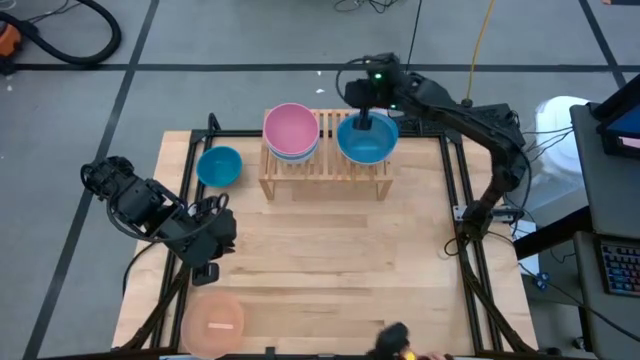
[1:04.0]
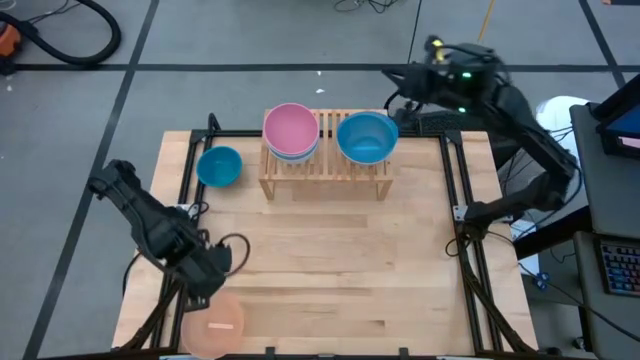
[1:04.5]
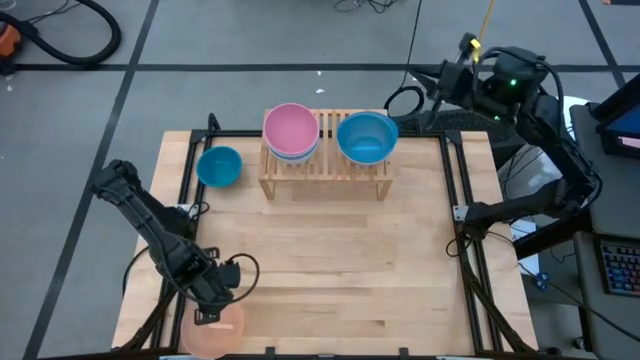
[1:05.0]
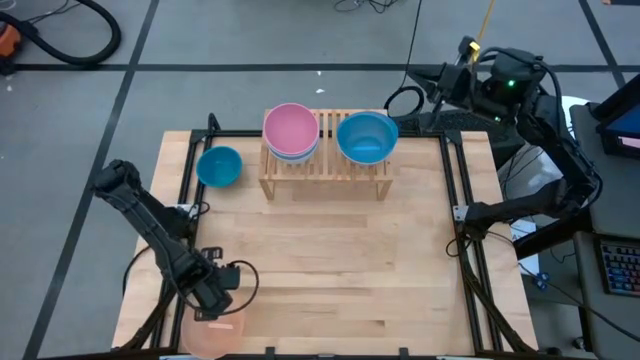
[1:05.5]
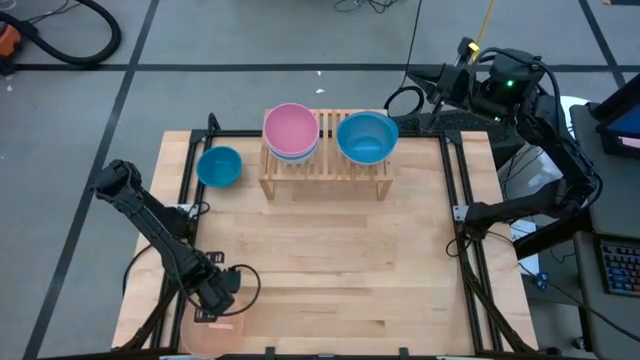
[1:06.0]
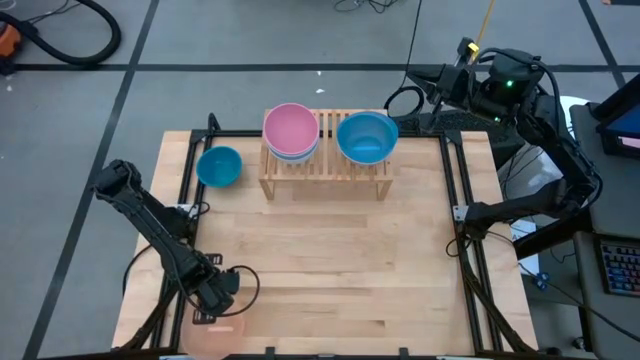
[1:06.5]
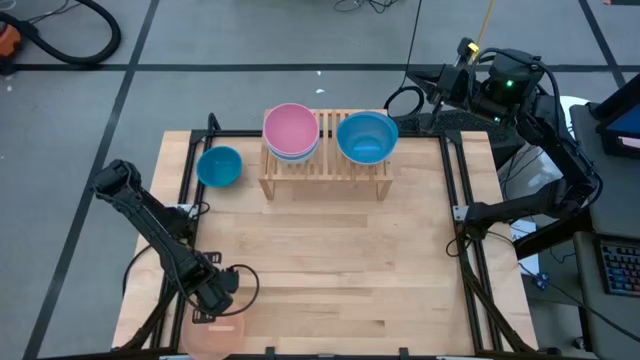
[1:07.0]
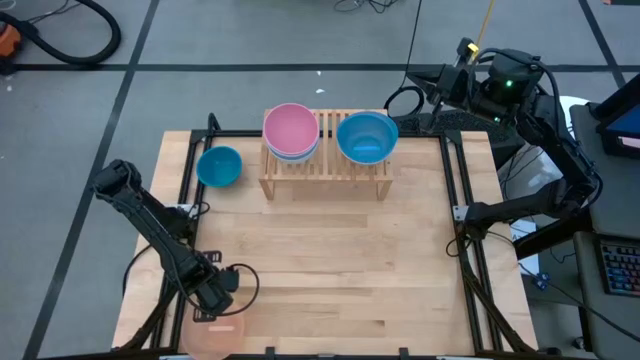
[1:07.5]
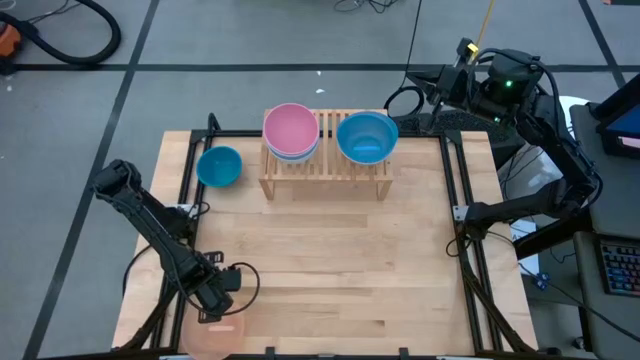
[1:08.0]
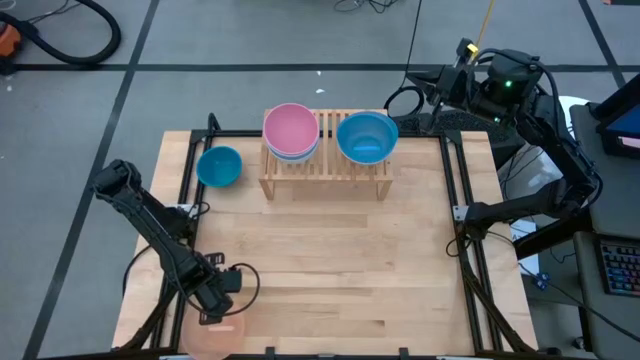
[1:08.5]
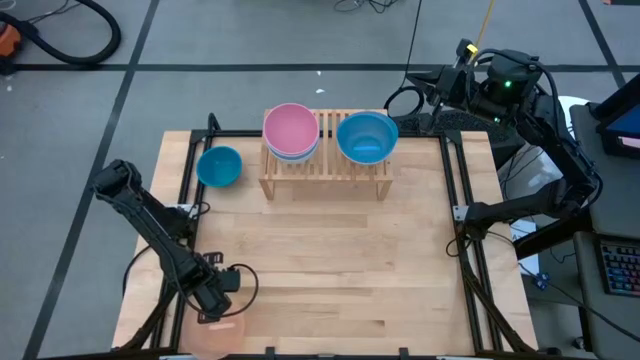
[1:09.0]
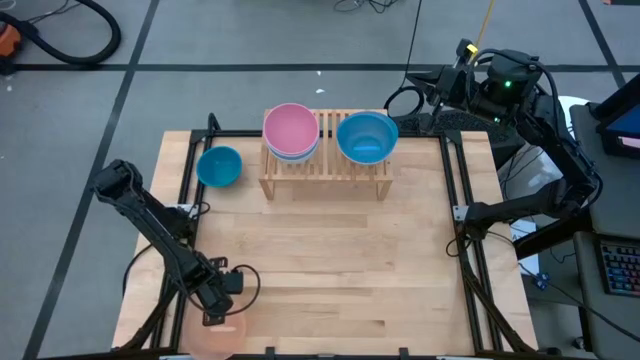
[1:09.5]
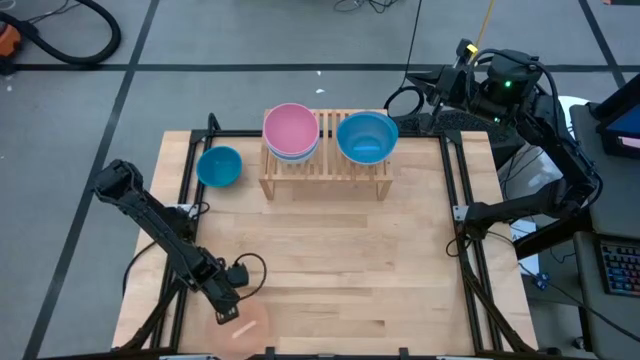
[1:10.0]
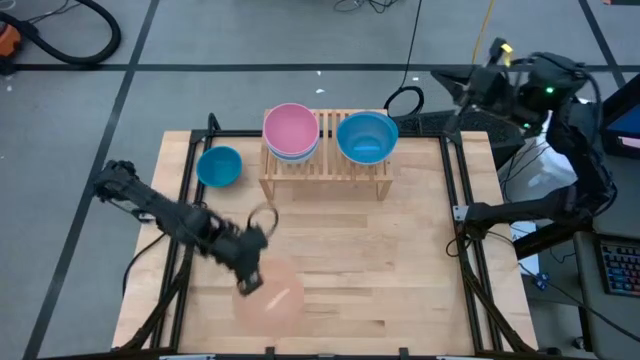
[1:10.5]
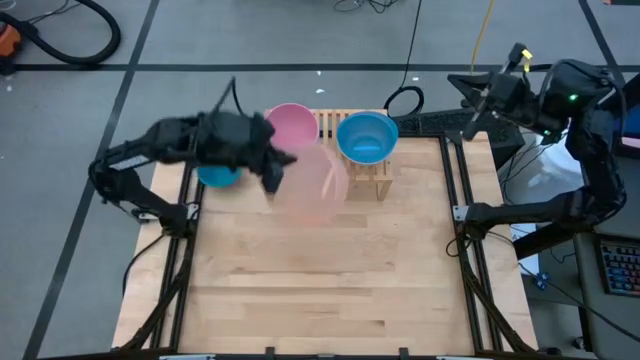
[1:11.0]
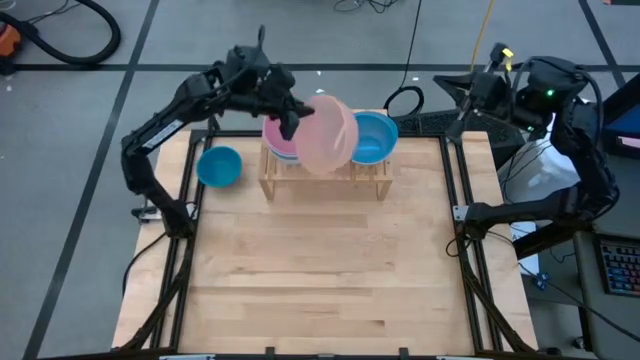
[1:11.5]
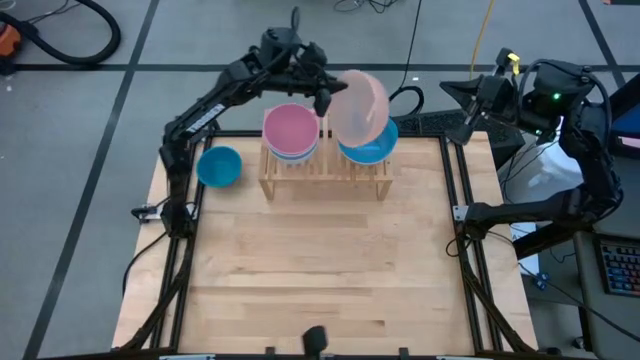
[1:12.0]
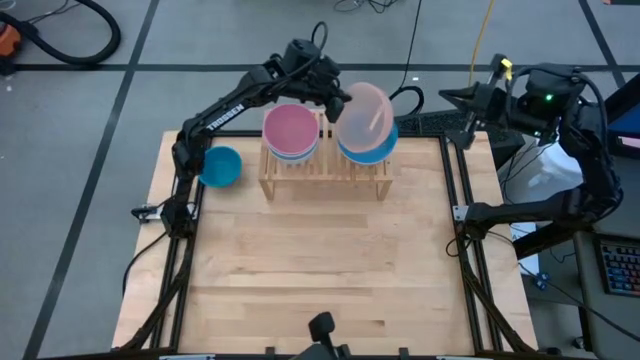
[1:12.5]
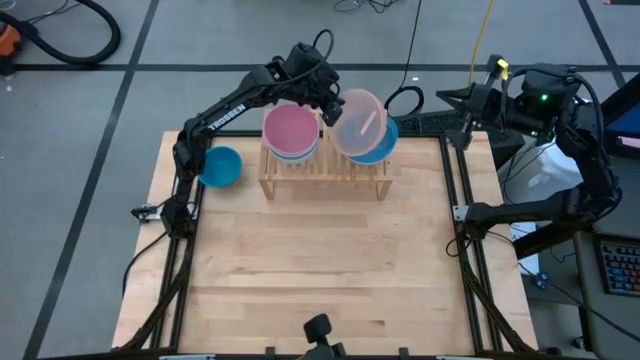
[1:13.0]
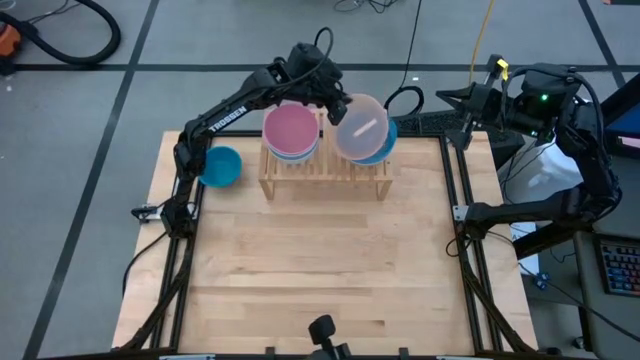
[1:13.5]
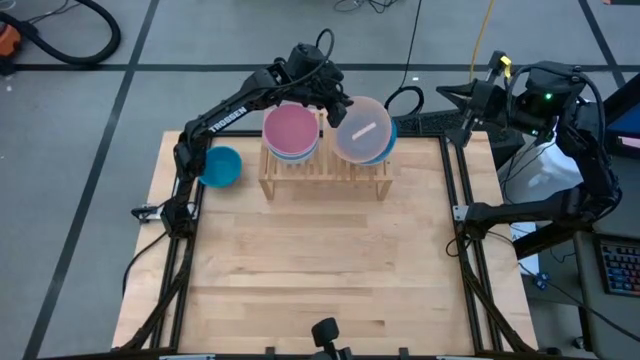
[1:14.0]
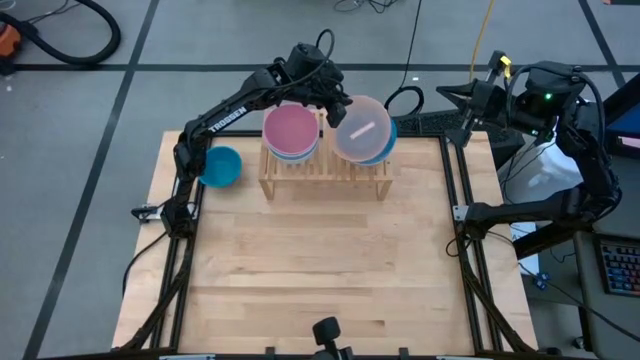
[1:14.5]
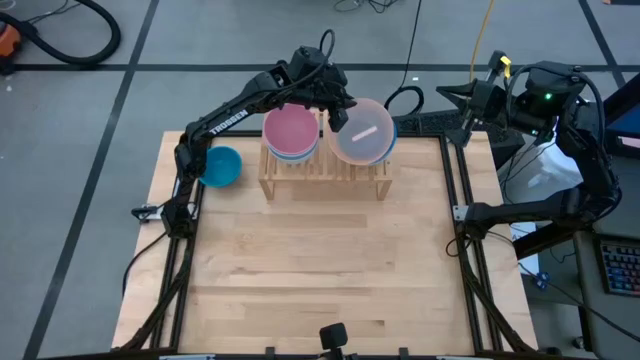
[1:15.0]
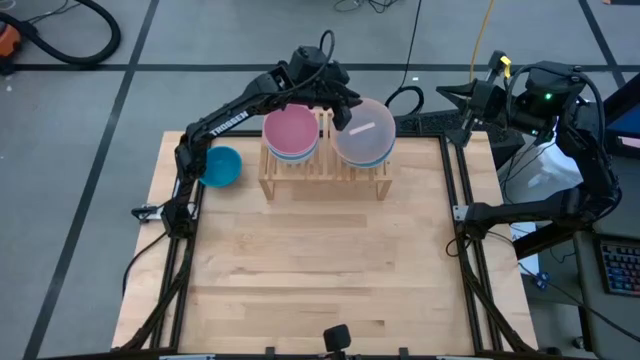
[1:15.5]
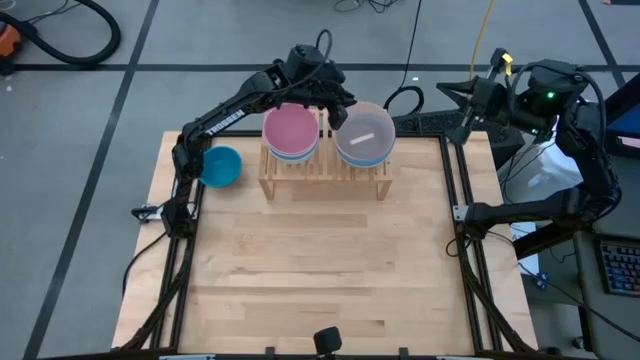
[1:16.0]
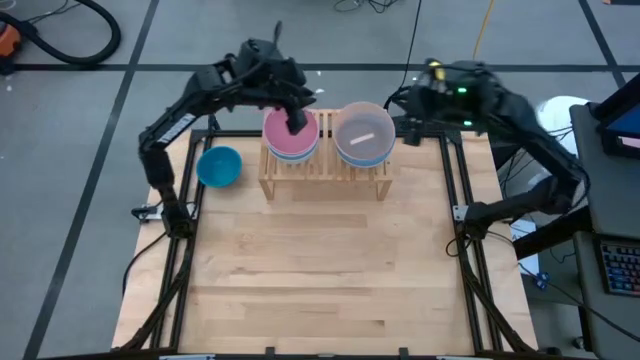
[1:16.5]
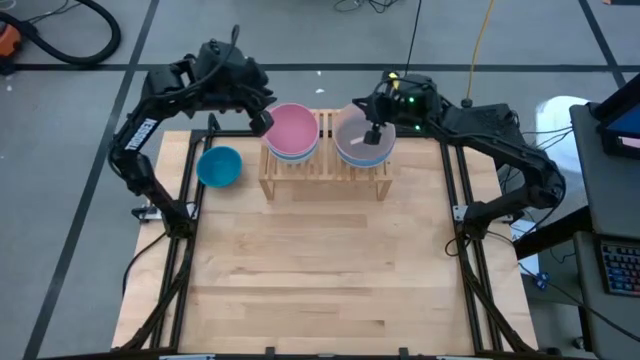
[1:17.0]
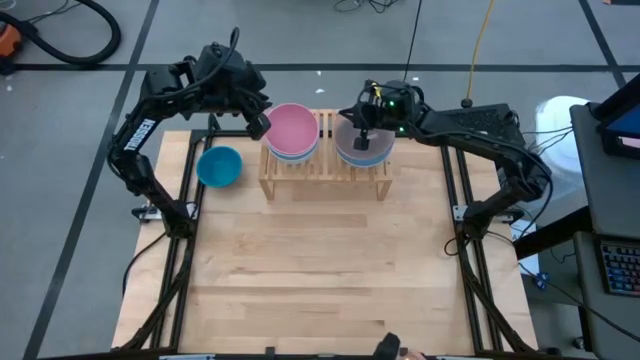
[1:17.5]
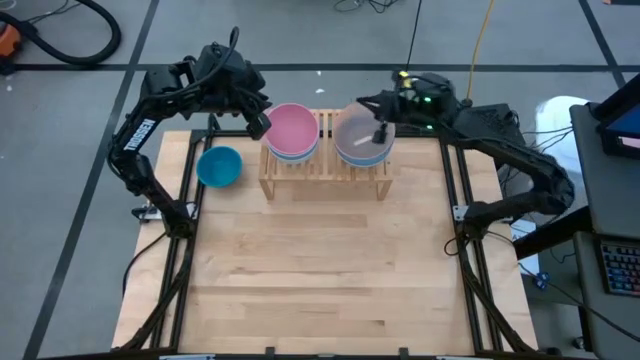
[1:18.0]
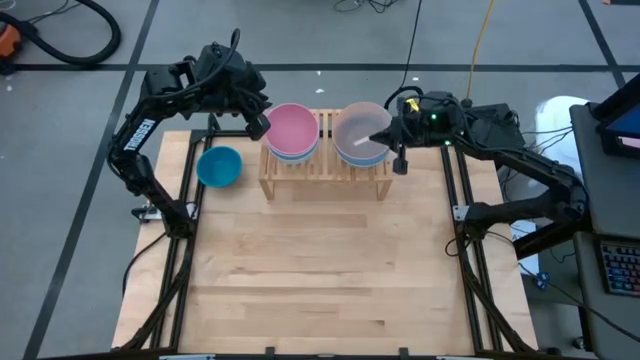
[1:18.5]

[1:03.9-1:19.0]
Task: Place and stack bowls onto a shelf
Stack the large orange bowl on top of the large blue bowl on the shelf

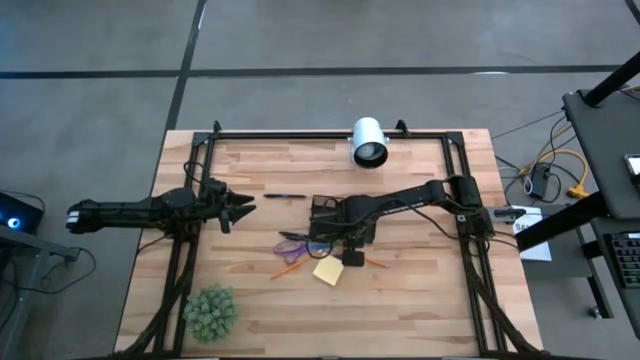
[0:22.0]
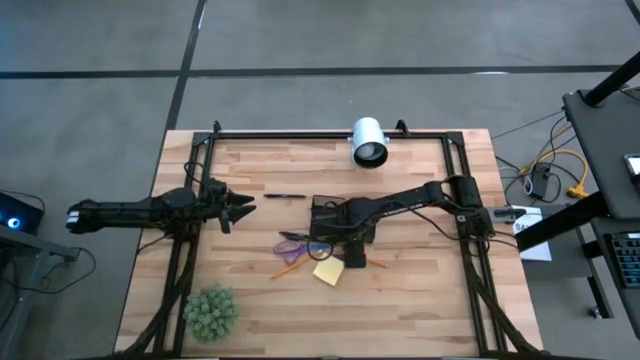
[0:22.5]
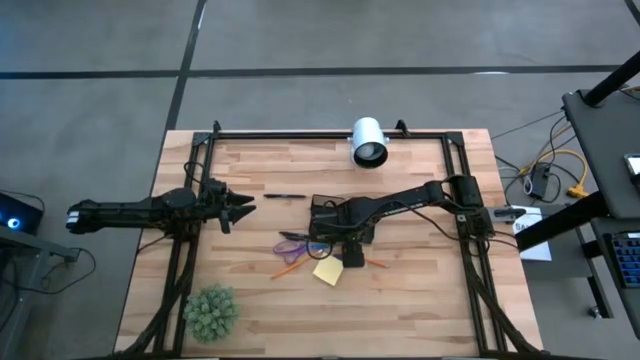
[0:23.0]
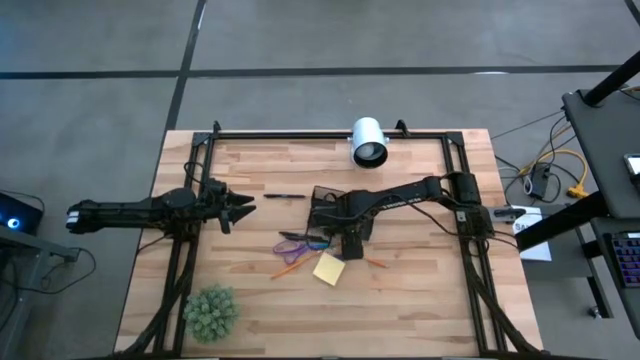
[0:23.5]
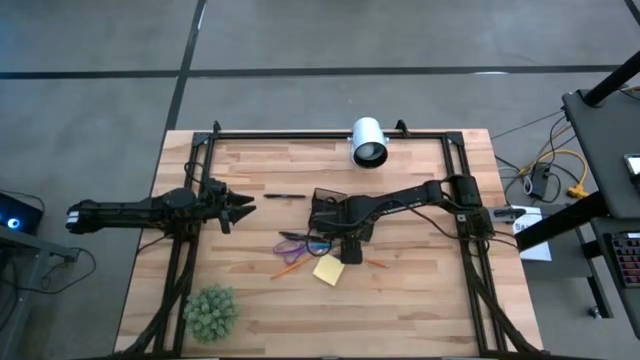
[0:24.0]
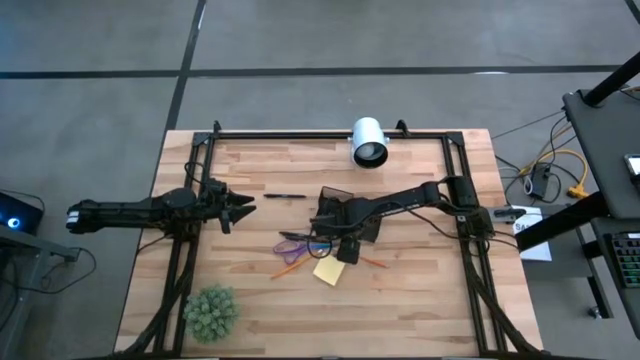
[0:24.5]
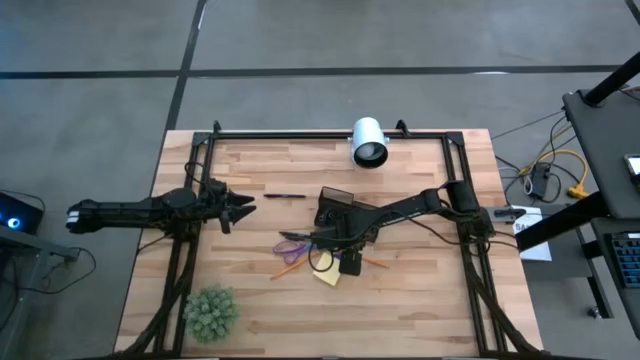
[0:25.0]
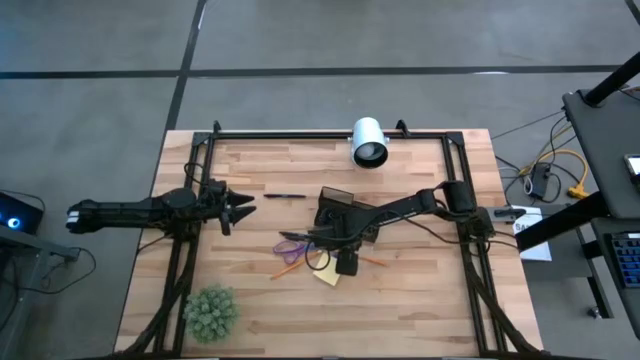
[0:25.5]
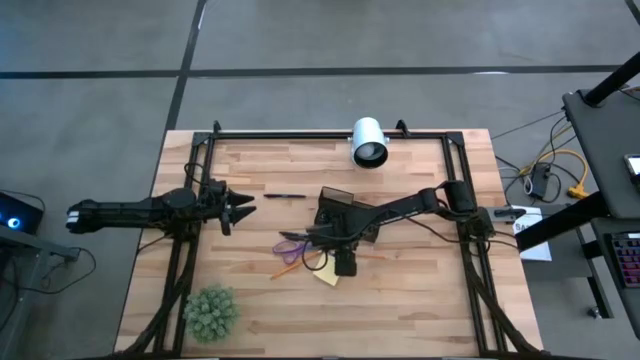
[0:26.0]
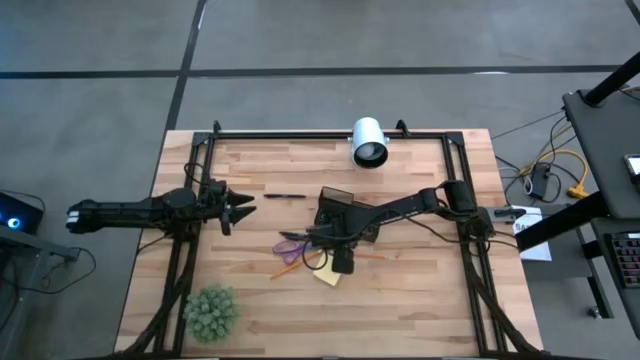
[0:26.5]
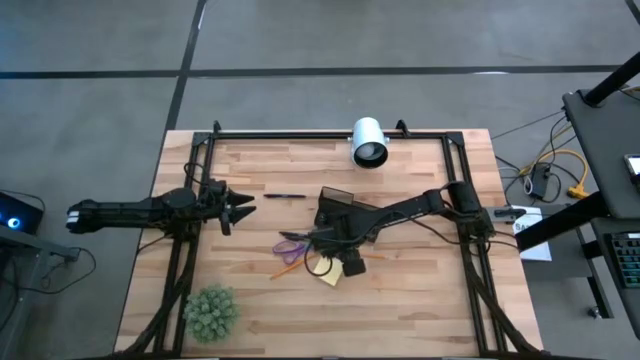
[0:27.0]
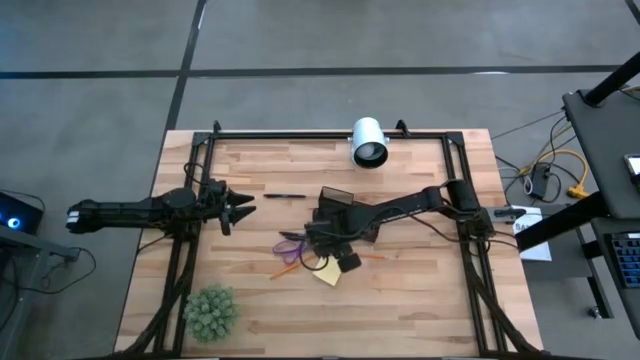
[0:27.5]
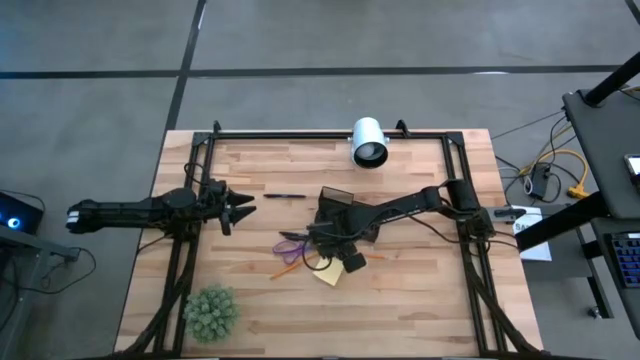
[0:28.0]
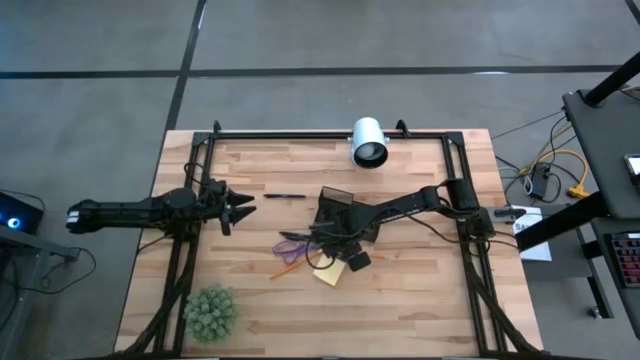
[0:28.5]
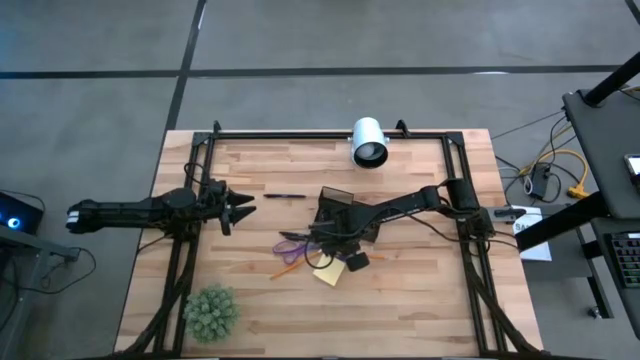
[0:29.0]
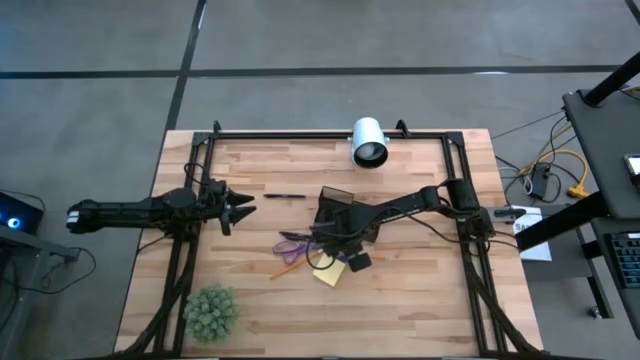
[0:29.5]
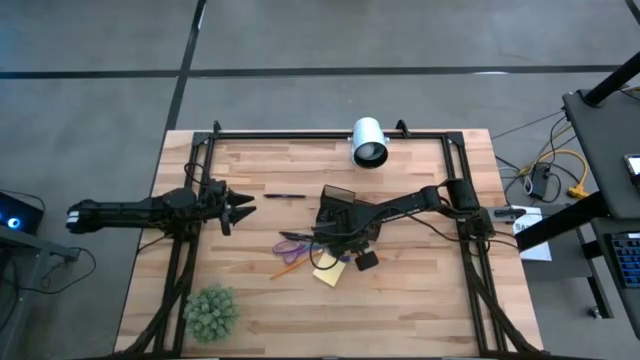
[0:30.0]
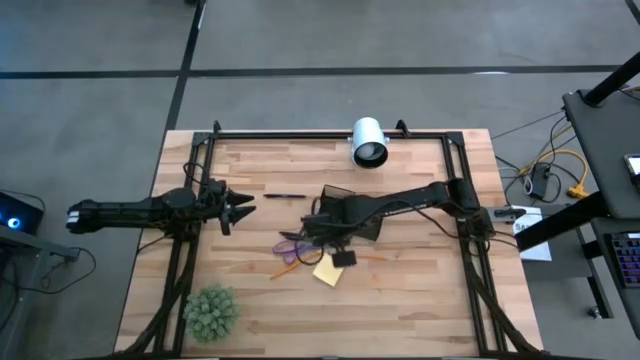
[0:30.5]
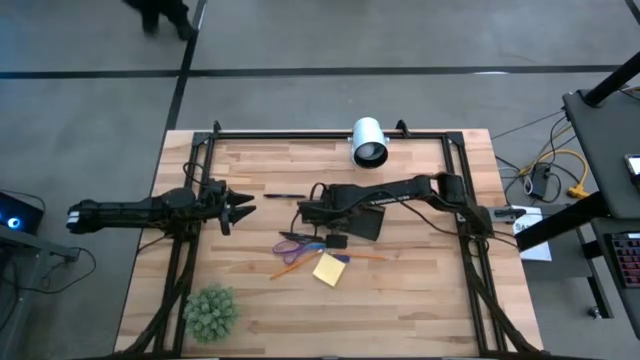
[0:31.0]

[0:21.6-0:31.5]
Task: Pick and place office supplies into organizer
Put the black binder clip into the black mesh organizer
